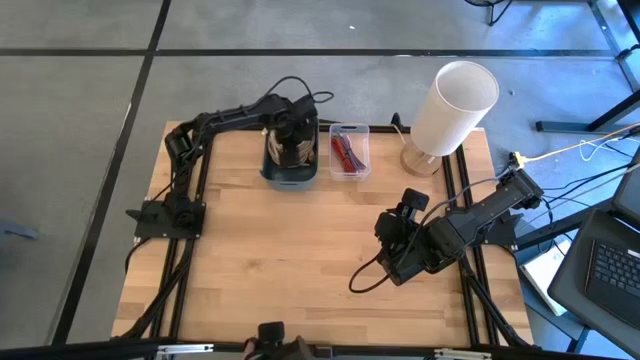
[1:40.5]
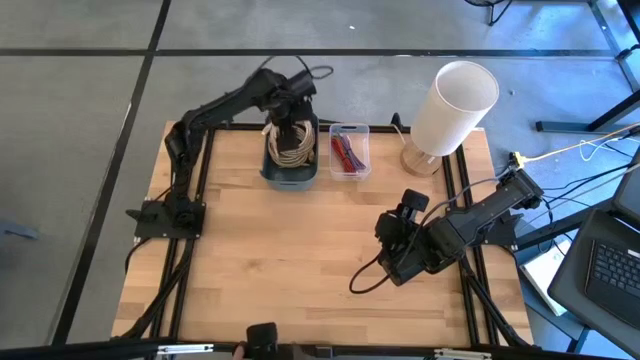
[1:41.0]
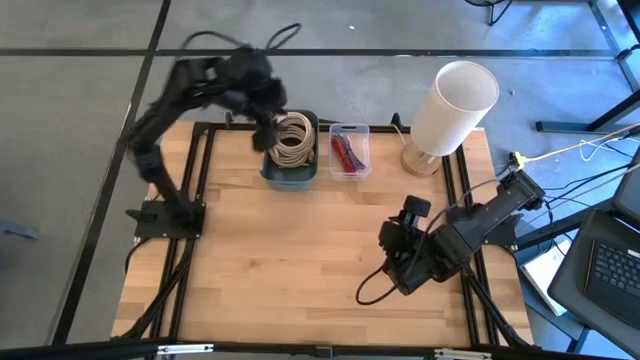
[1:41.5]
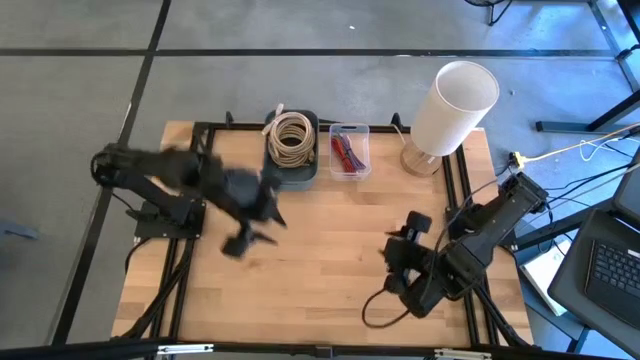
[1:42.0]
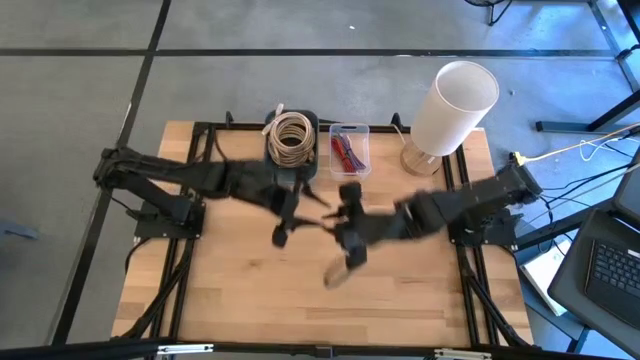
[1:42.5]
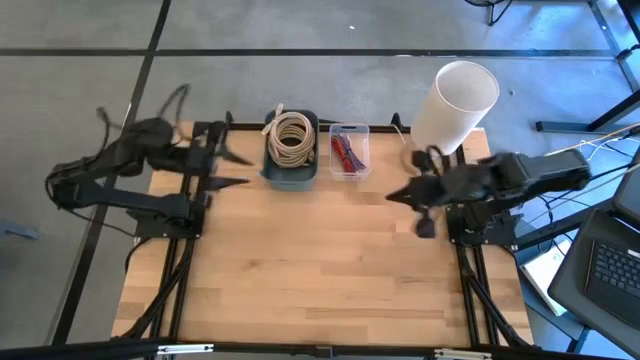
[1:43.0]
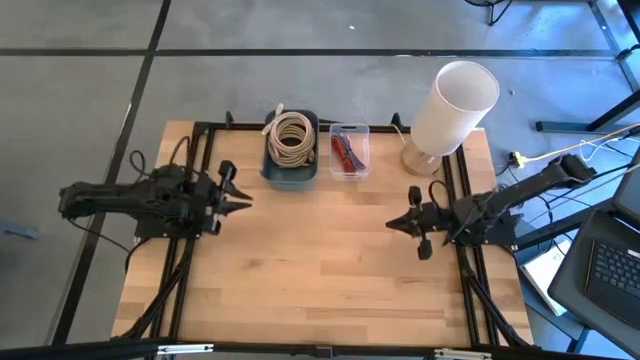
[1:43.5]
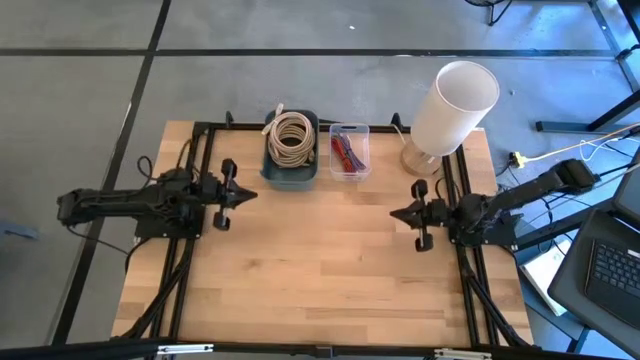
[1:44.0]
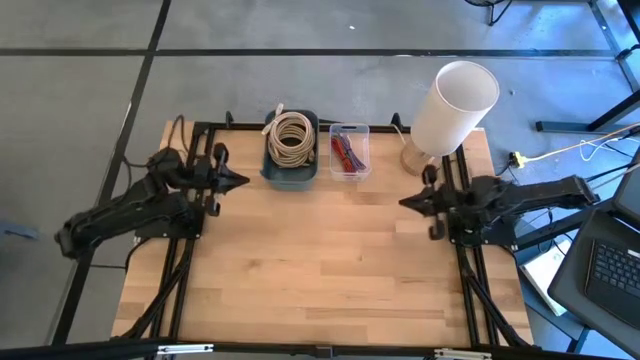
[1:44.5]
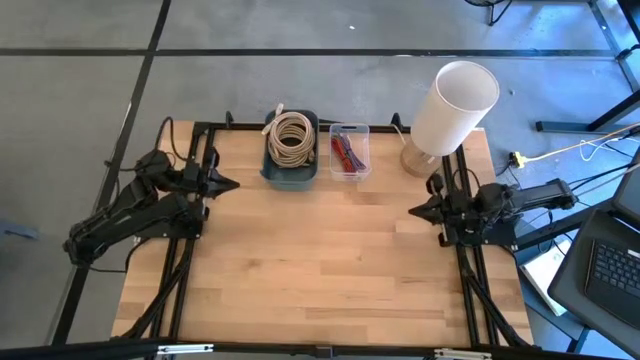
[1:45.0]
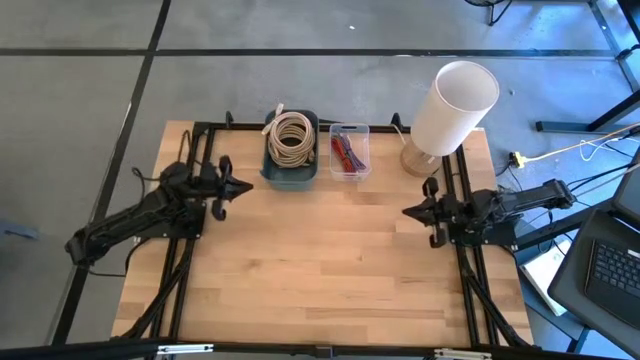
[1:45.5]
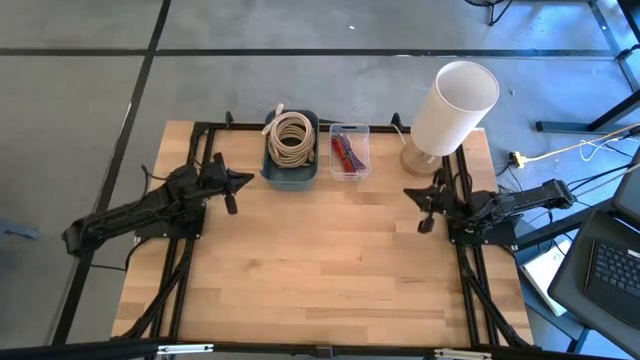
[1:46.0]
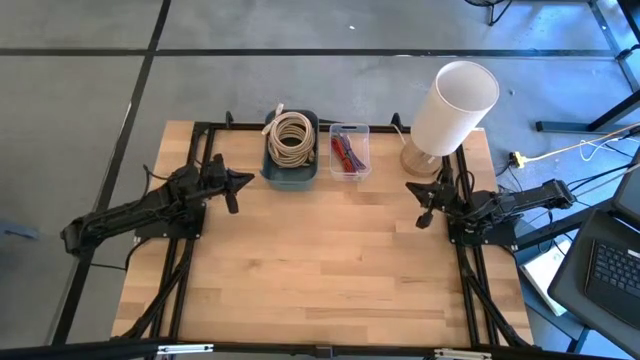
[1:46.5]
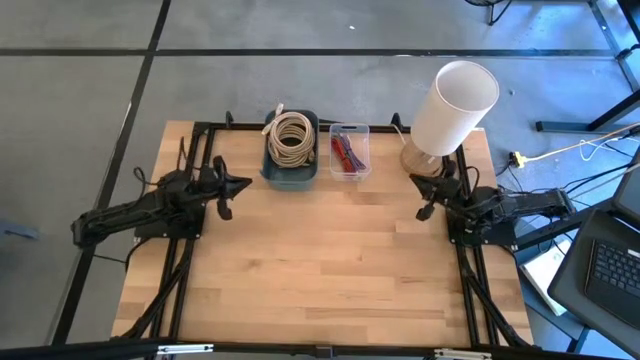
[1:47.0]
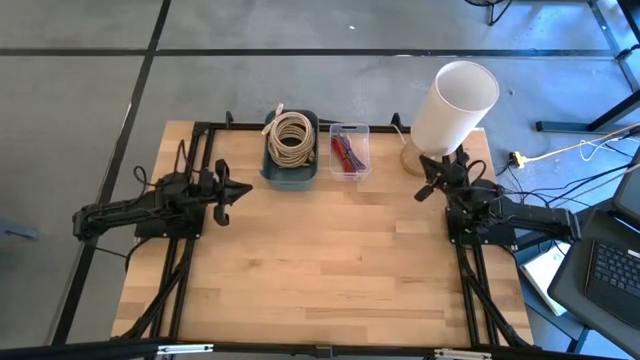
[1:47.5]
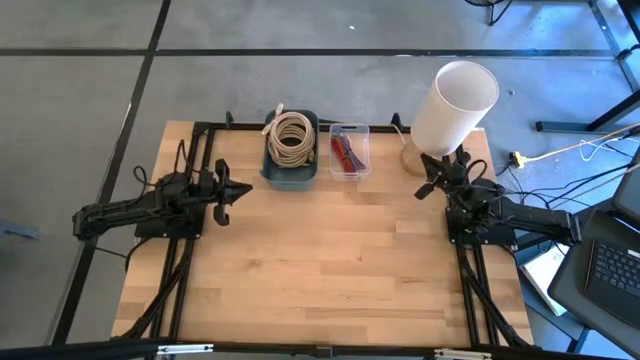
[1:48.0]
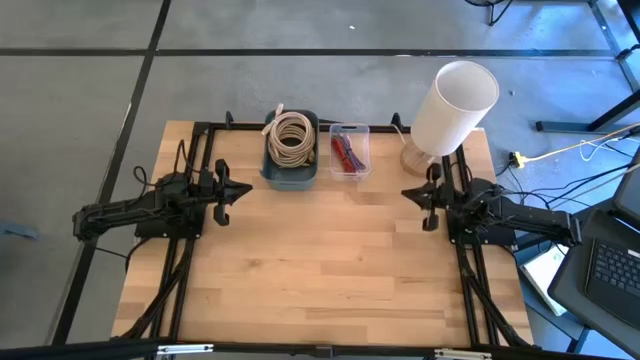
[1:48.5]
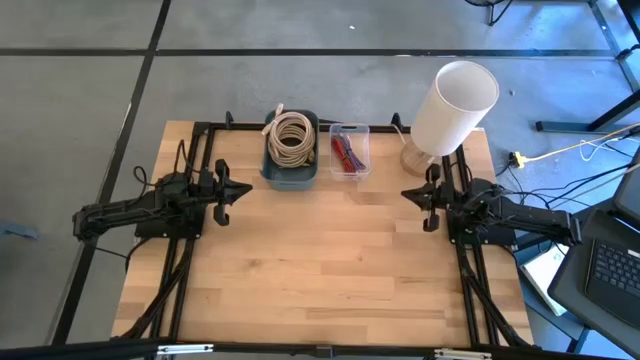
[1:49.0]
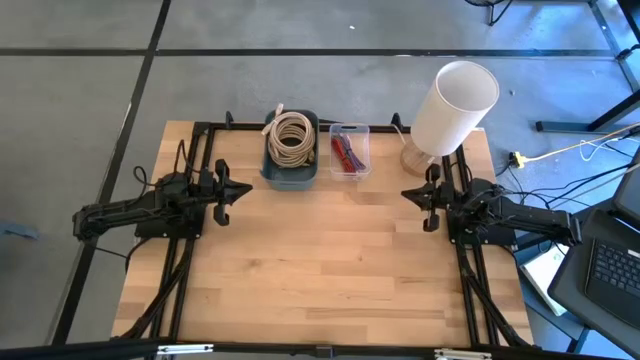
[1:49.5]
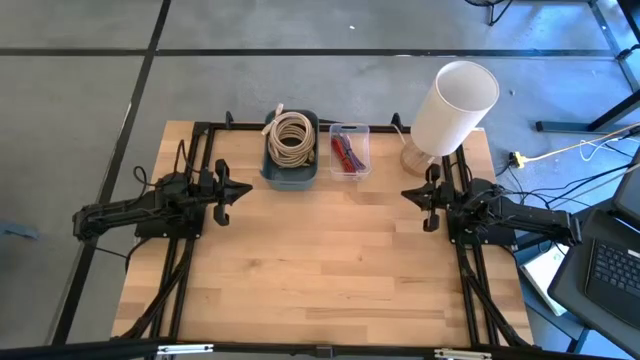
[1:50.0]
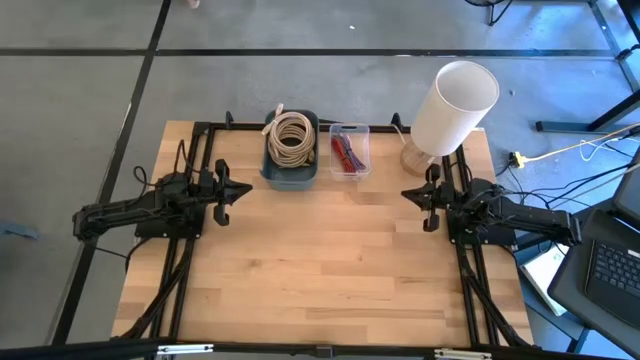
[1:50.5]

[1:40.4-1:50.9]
Return to home position

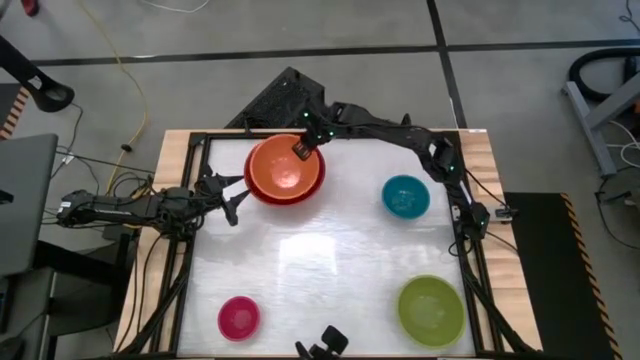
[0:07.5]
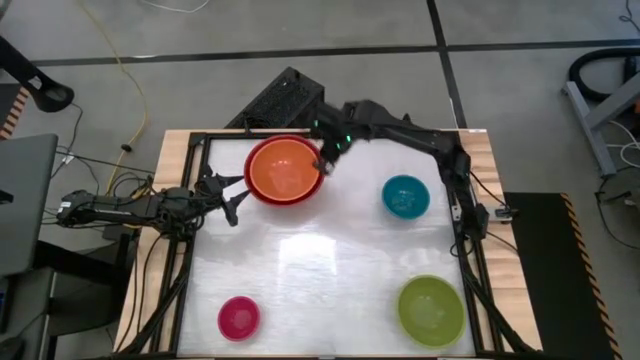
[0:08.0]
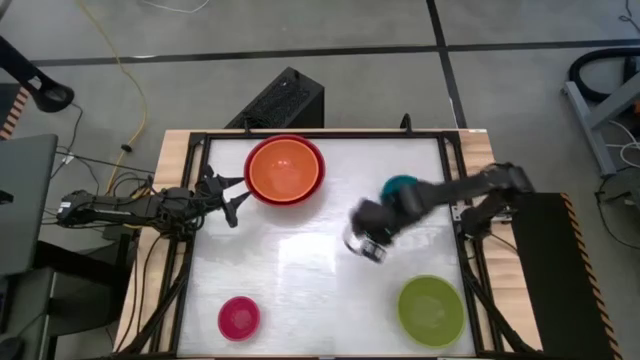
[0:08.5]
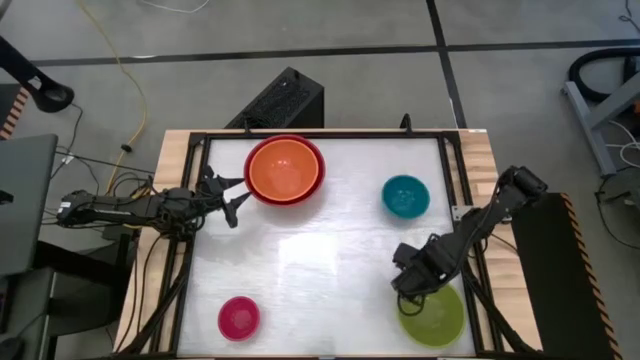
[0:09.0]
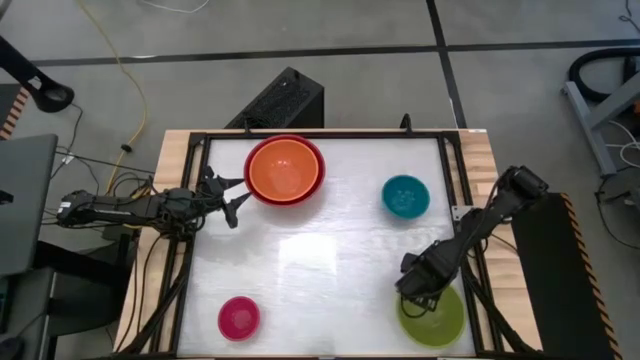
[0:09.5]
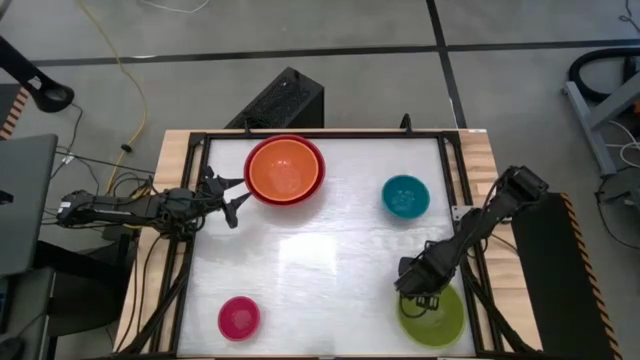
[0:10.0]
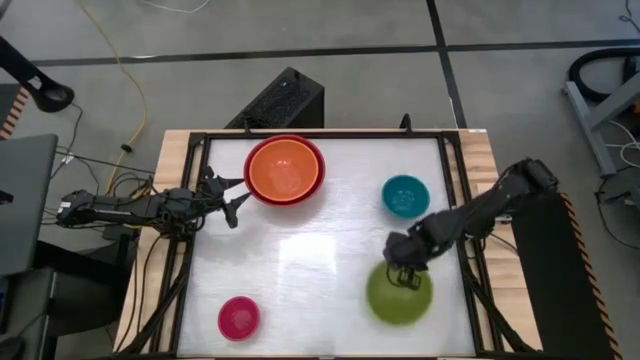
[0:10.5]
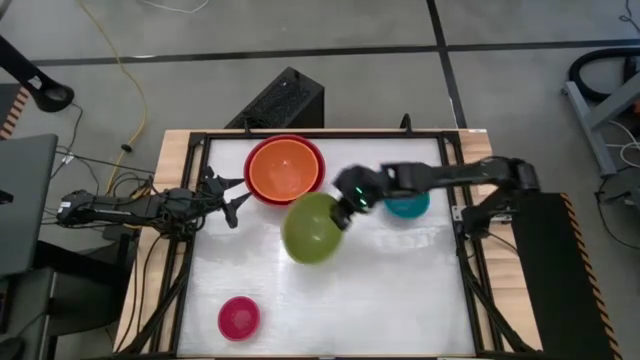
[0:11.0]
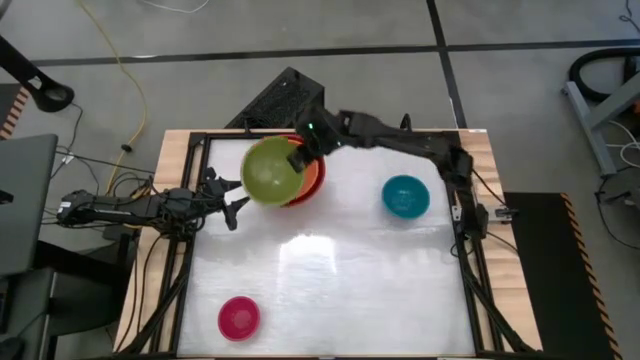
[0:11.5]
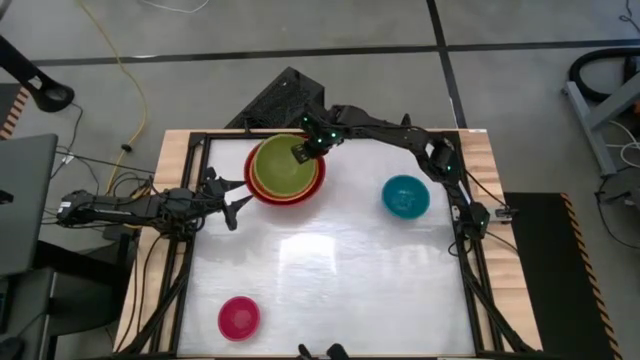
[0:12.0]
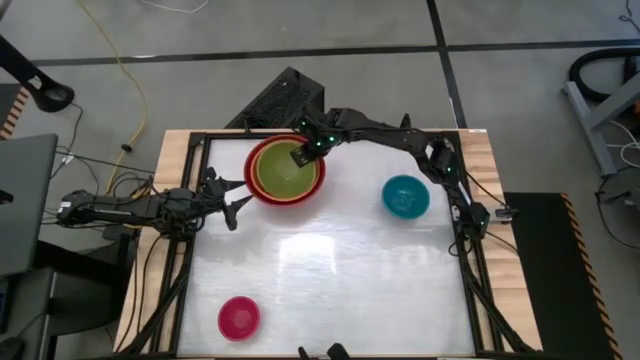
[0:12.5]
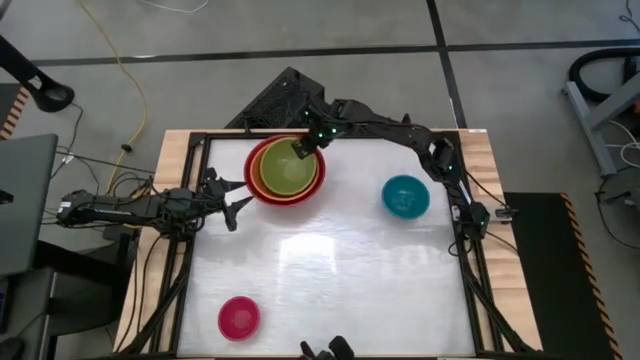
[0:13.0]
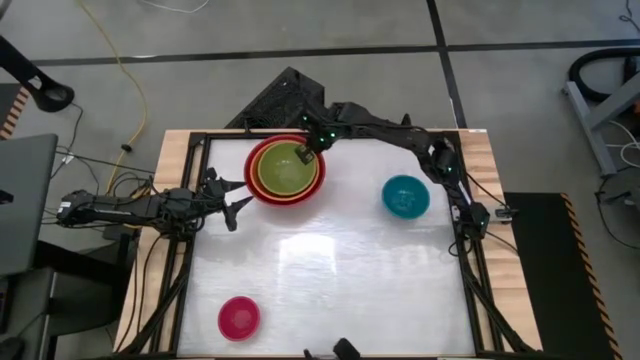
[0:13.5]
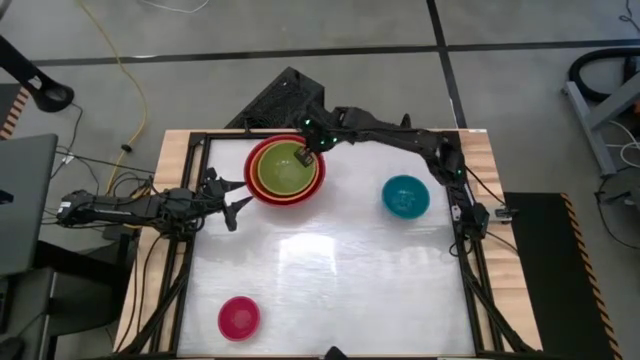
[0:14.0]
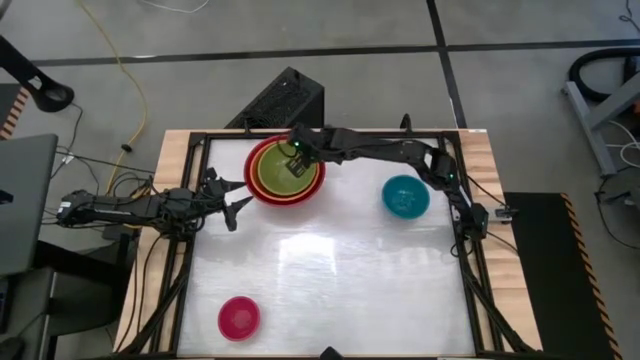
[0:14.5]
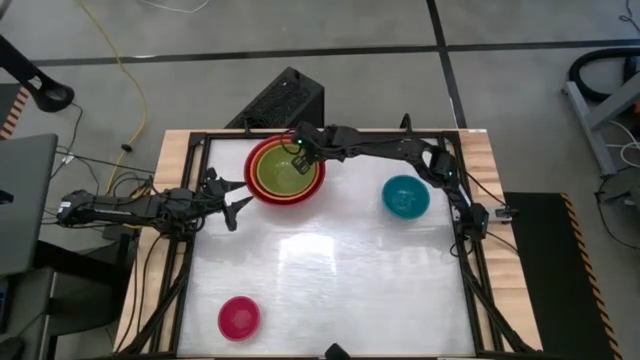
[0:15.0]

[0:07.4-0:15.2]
Stack the green bowl on top of the orange bowl

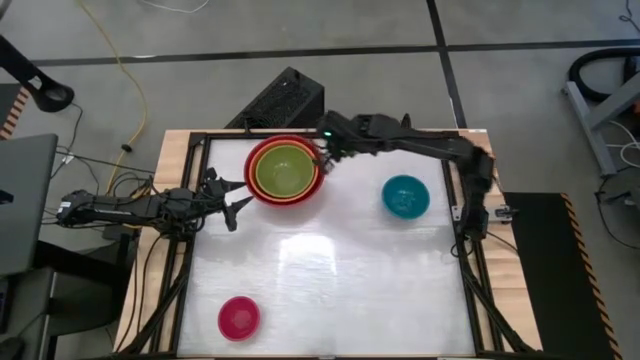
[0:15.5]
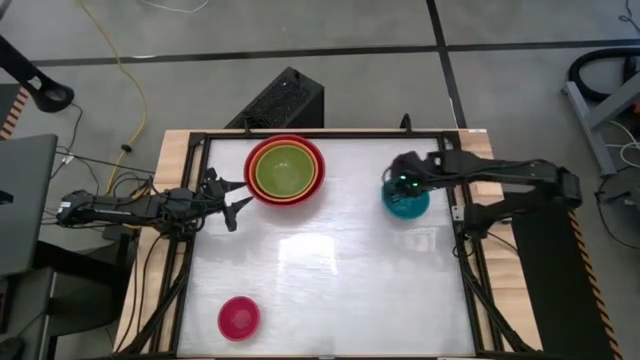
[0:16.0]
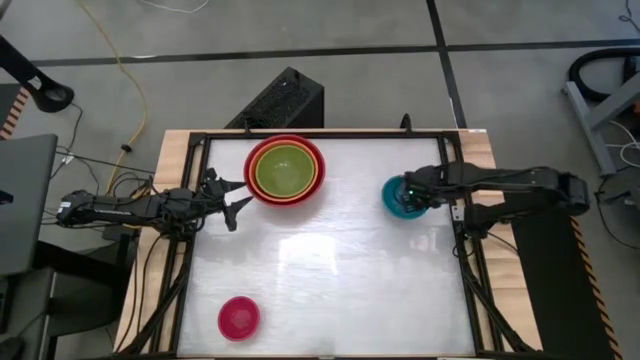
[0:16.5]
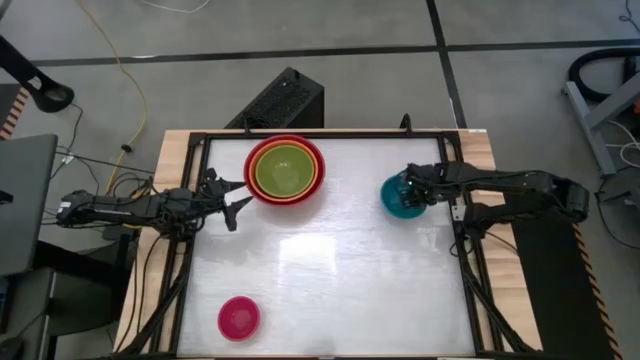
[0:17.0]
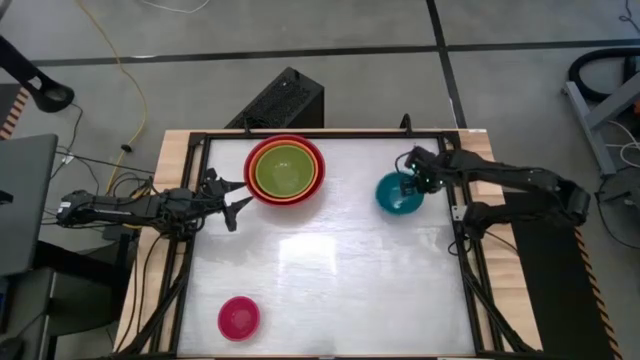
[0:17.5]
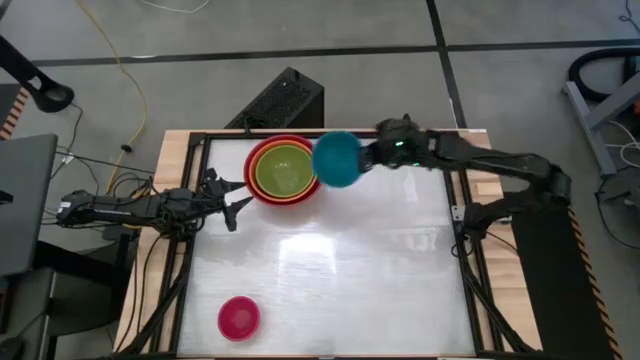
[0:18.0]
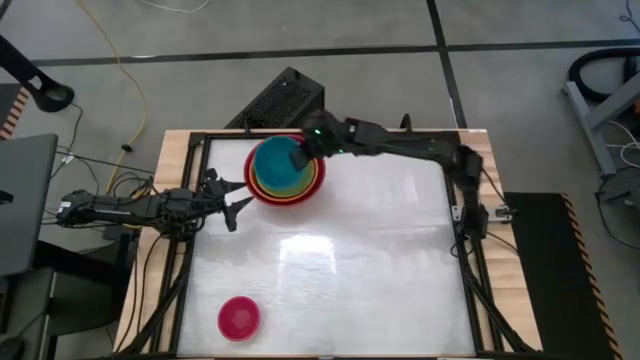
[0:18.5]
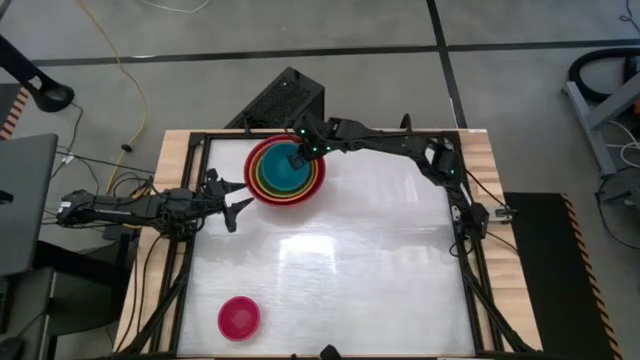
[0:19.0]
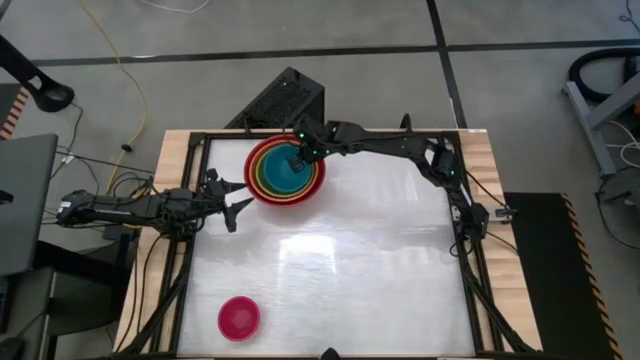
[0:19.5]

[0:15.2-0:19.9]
Stack the blue bowl on top of the green bowl
